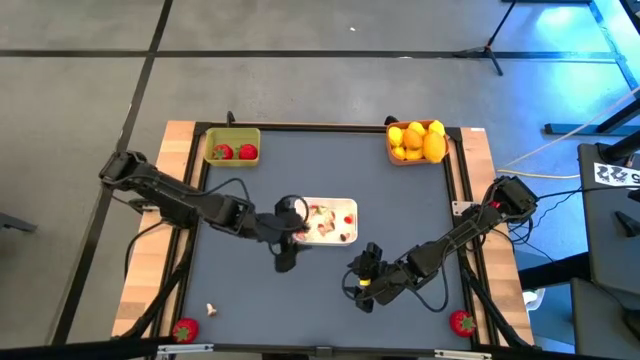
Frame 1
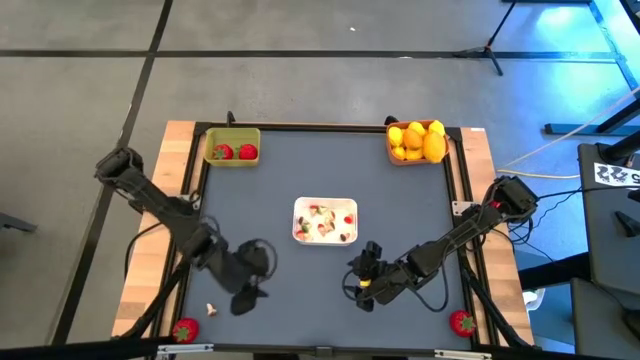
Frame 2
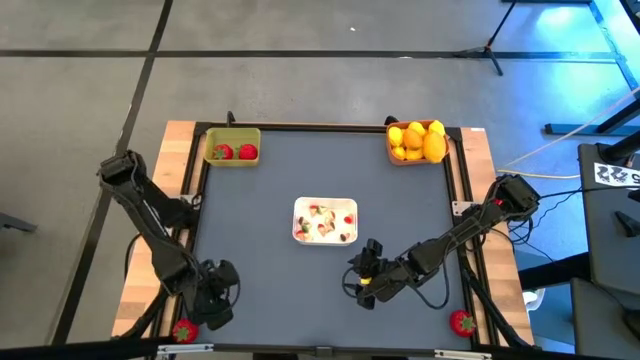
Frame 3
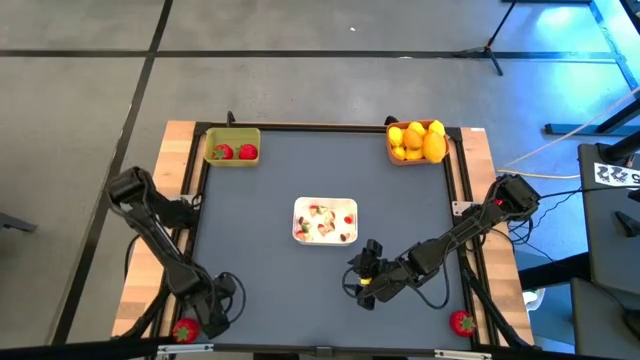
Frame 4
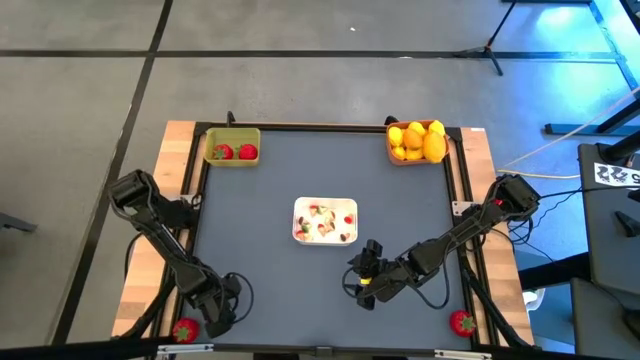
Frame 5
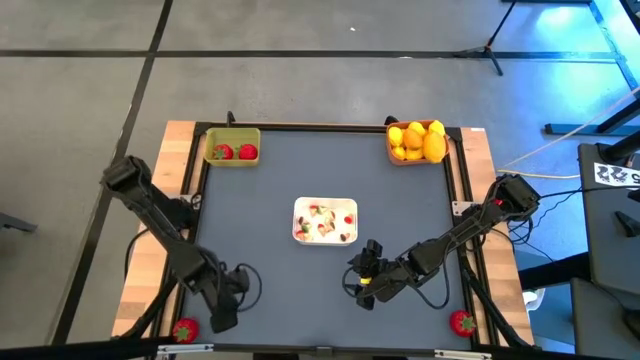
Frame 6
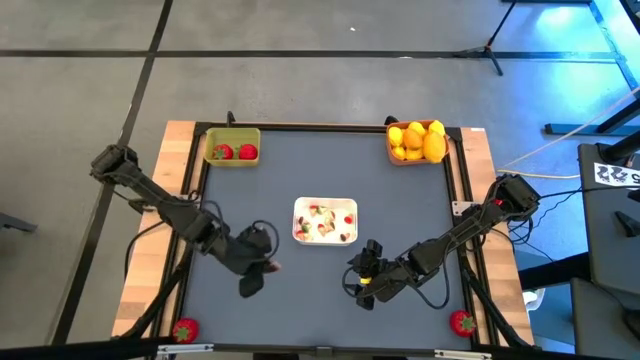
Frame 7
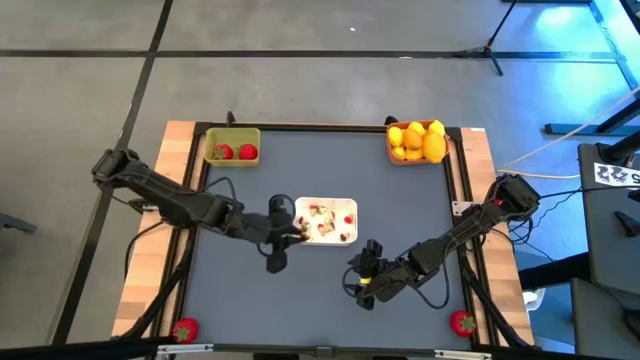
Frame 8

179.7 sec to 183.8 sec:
Task: Sort produce into baskets
Put the brown mushroom into the white bin

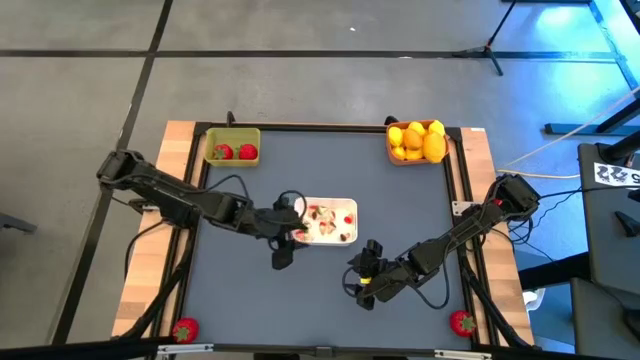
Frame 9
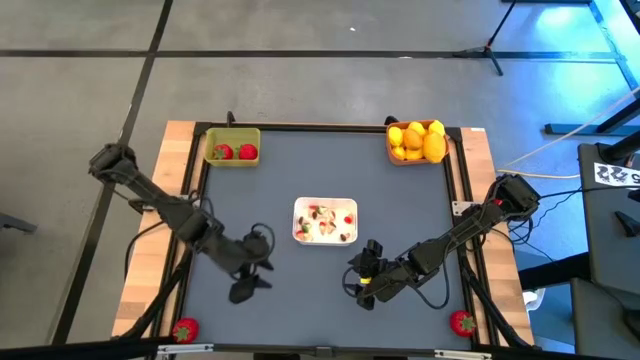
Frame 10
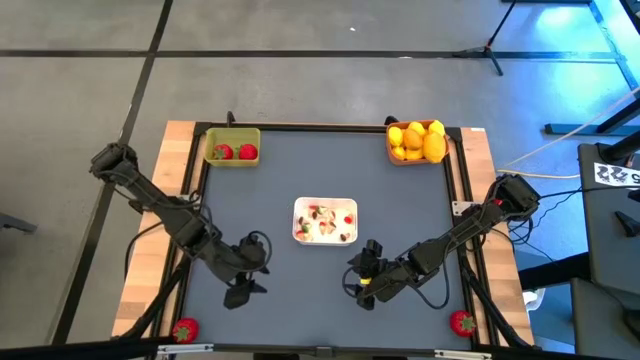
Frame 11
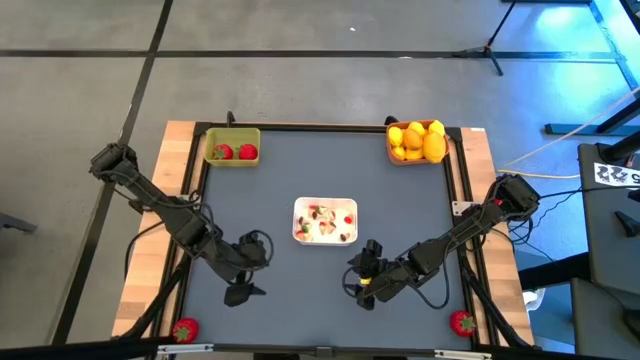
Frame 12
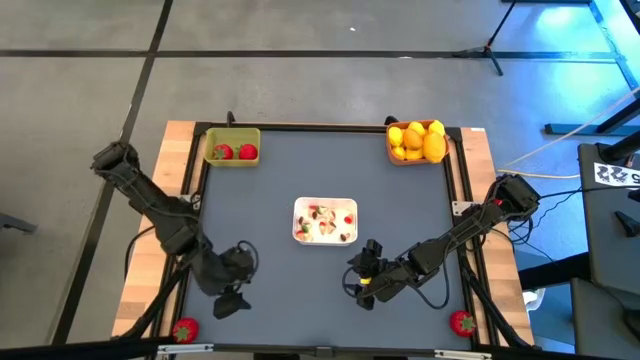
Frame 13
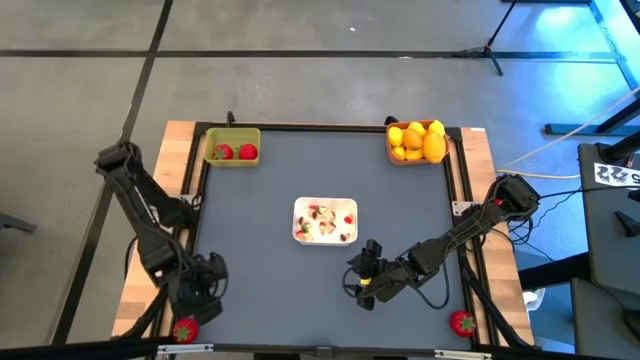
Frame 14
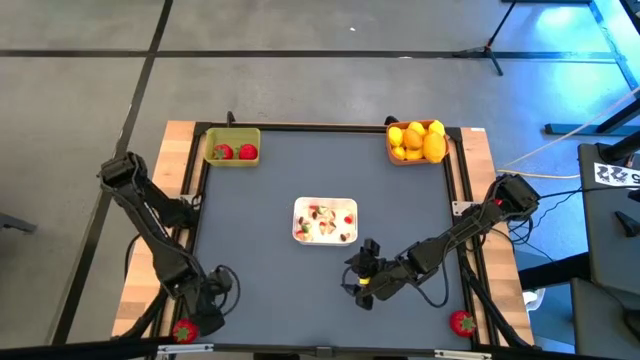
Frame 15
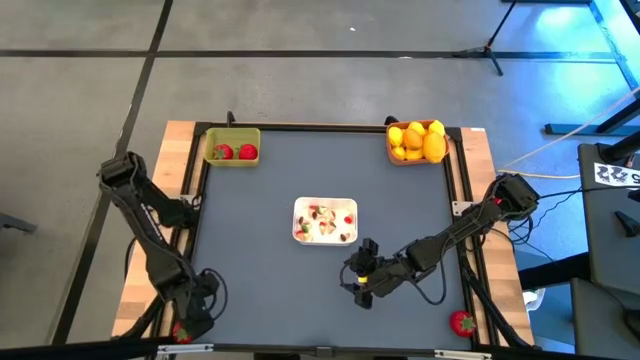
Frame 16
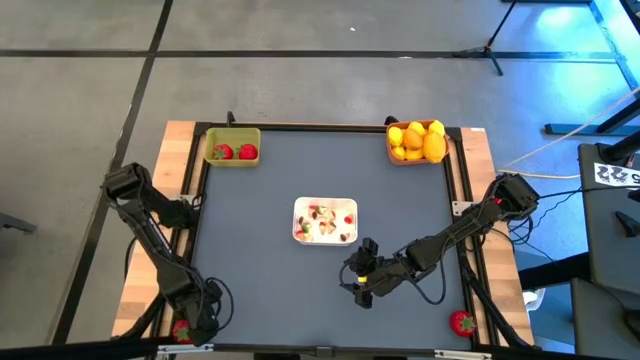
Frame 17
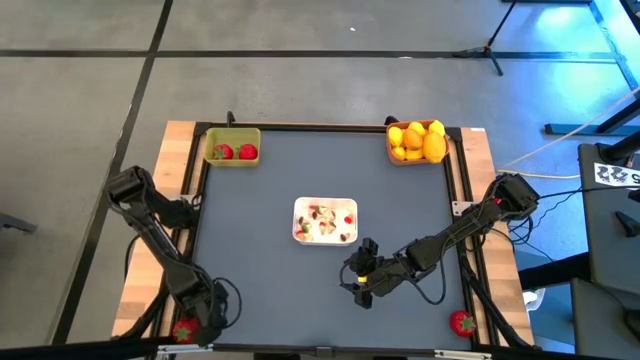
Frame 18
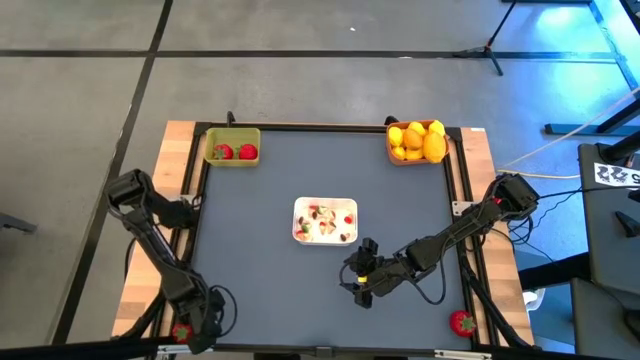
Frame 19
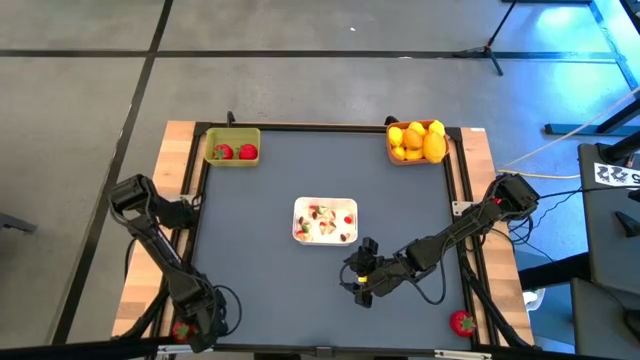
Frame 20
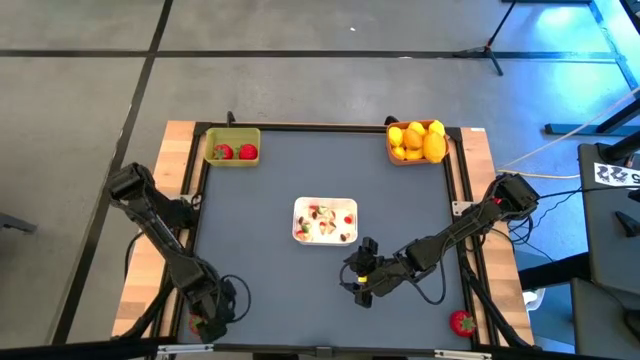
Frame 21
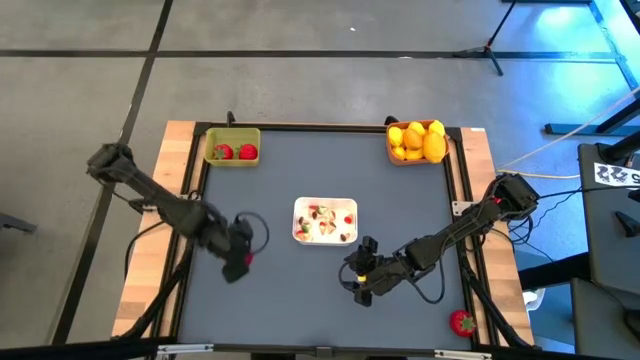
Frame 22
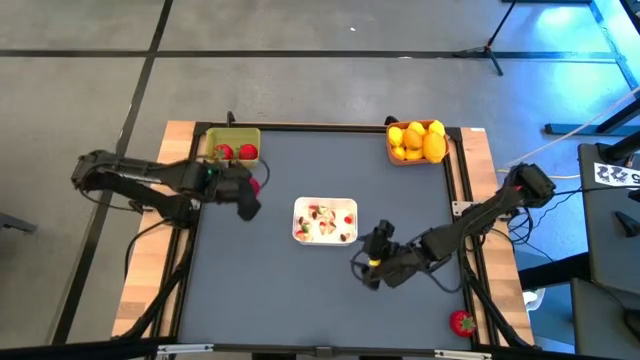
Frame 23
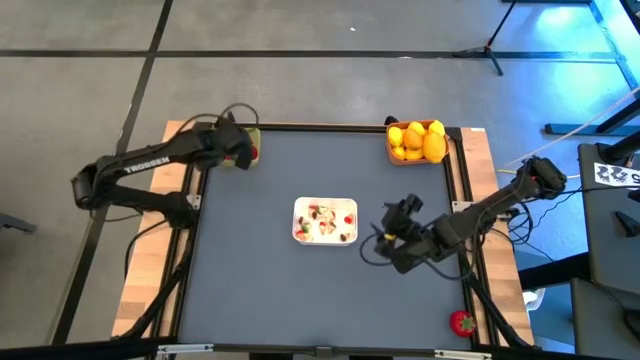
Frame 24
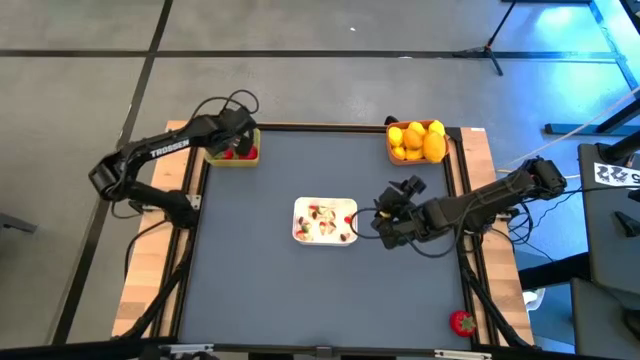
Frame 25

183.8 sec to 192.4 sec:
Put the red tomato into the yellow bin

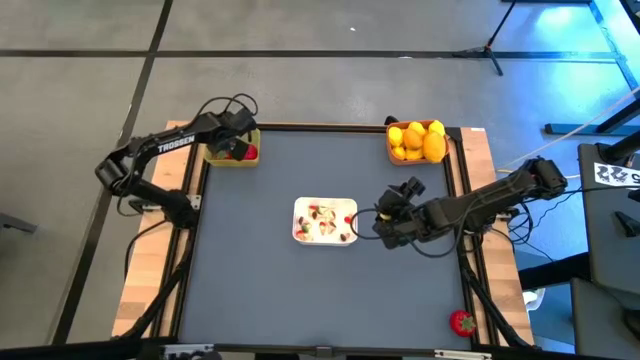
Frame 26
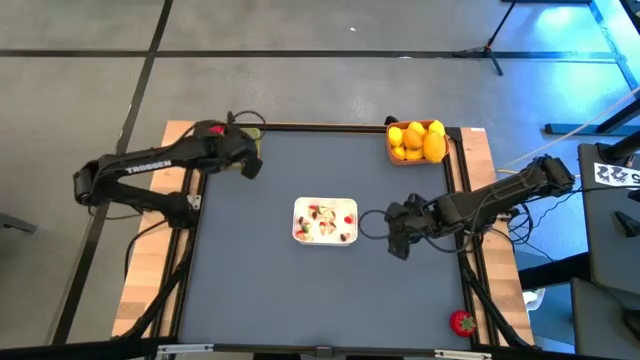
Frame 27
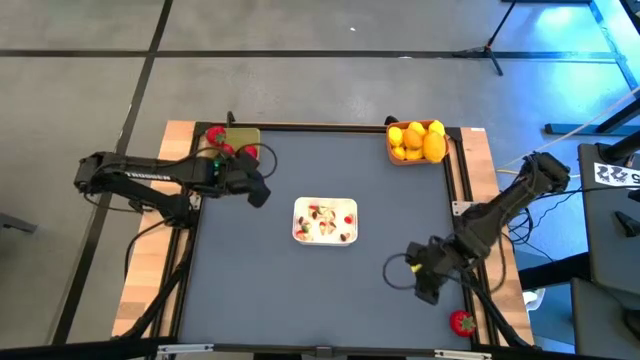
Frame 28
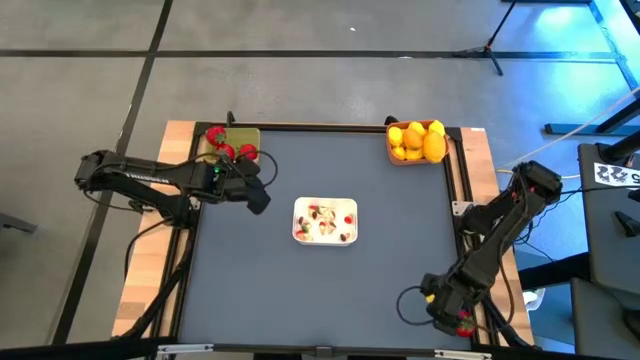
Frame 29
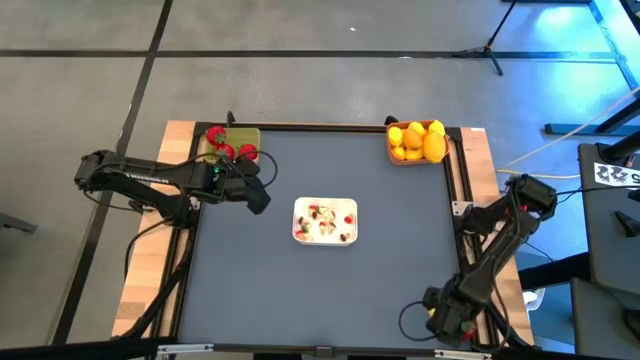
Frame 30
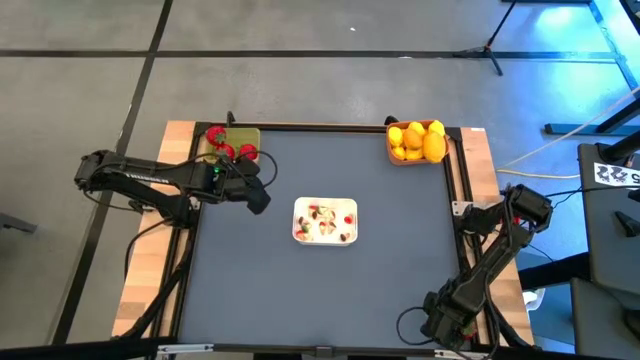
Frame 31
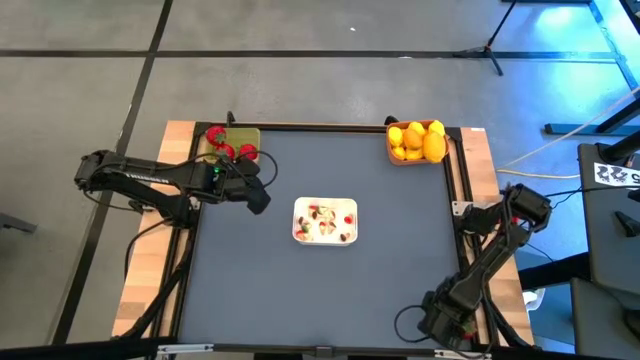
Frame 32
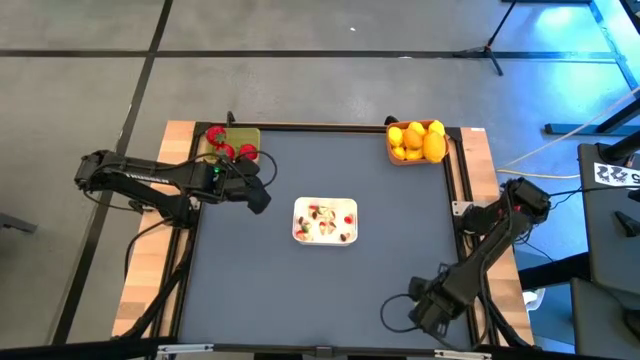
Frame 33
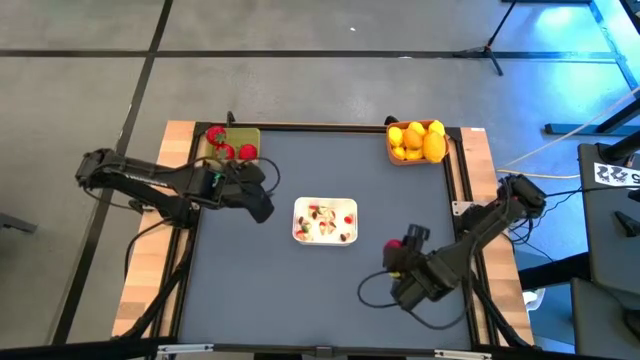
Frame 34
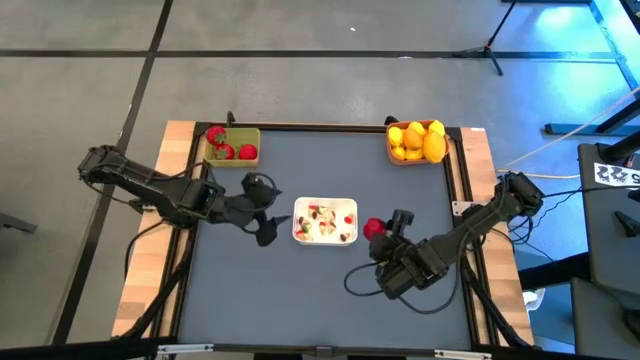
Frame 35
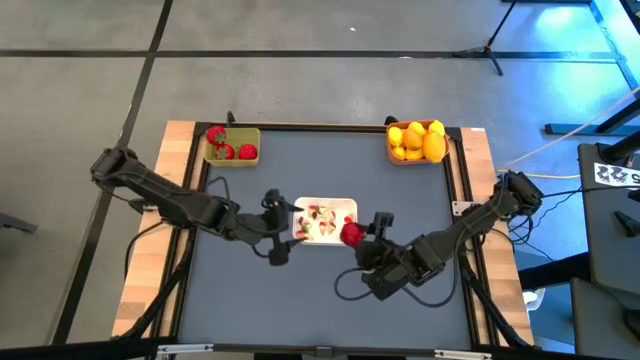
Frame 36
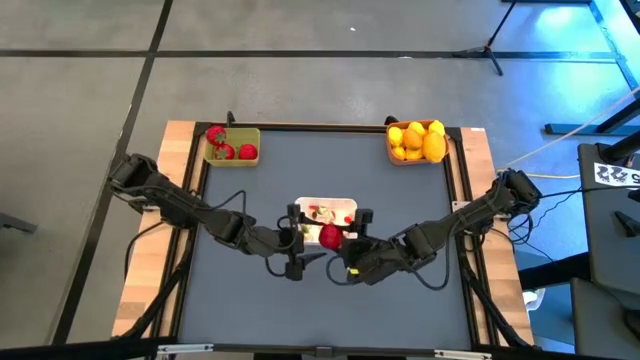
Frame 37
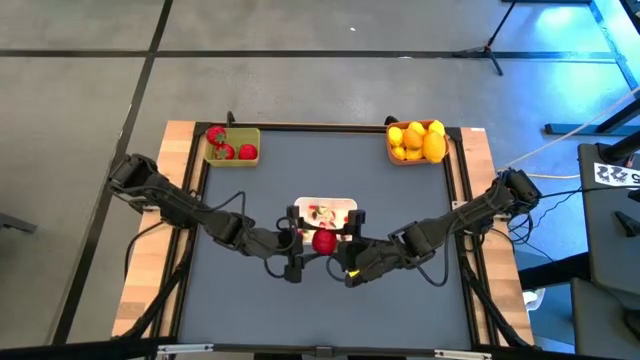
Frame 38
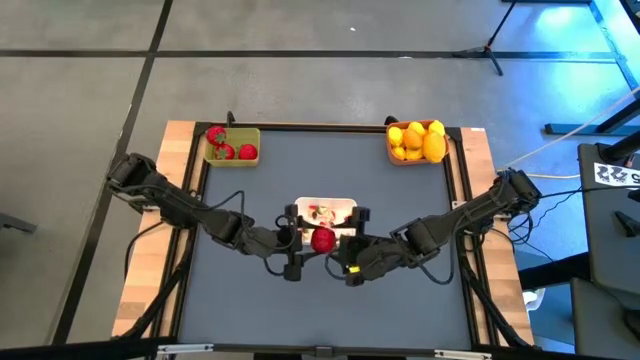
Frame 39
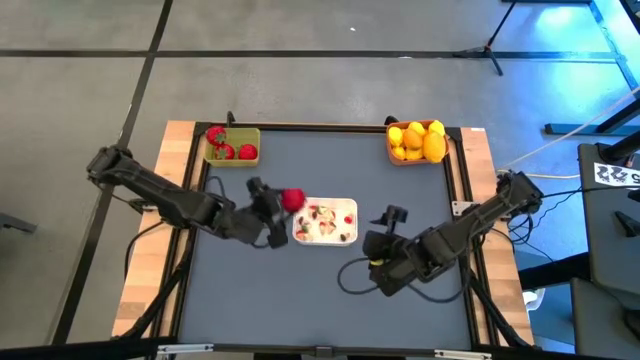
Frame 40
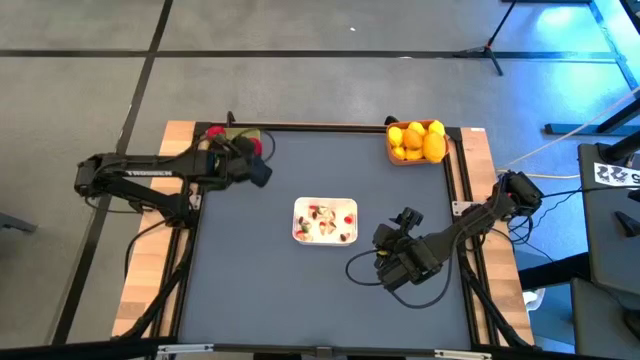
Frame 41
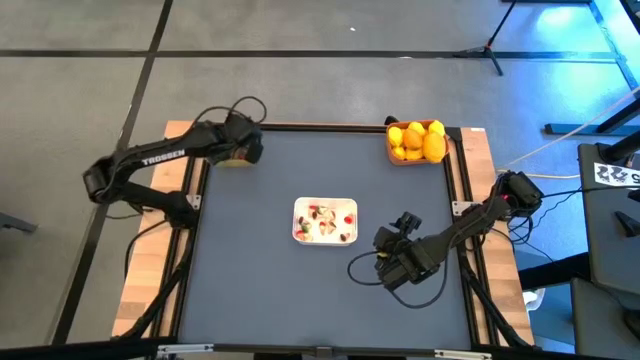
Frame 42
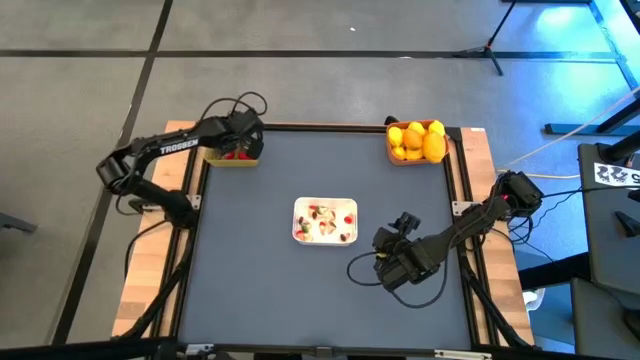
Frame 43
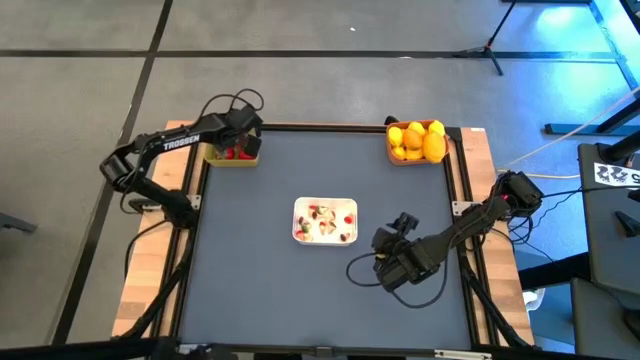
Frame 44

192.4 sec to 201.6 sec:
Put the red tomato into the yellow bin
